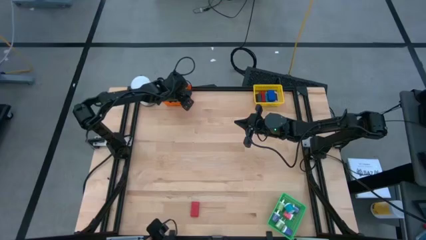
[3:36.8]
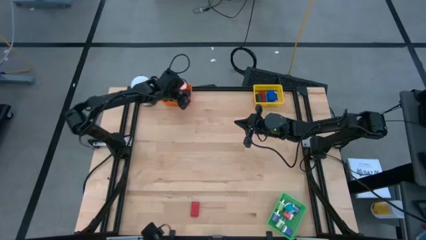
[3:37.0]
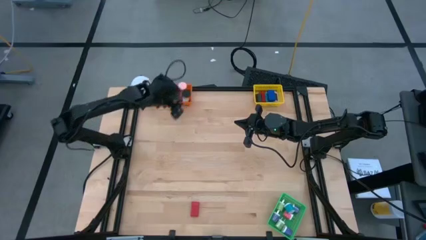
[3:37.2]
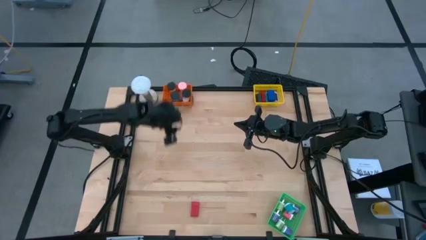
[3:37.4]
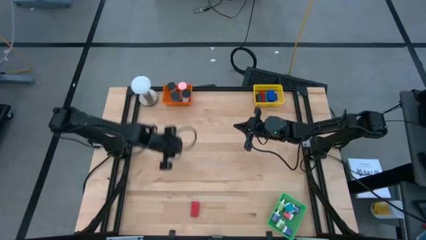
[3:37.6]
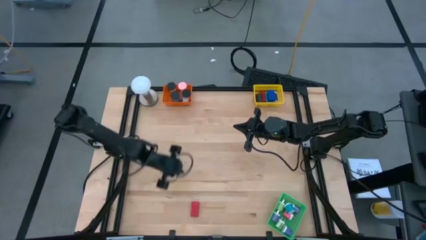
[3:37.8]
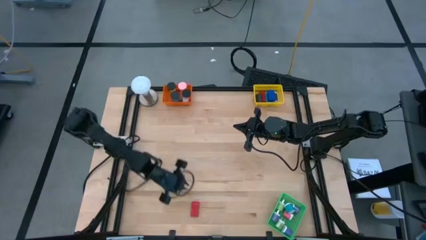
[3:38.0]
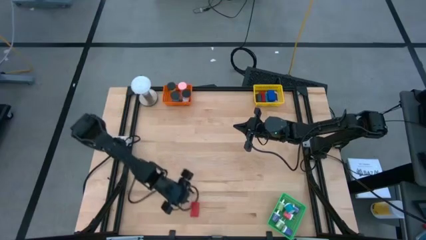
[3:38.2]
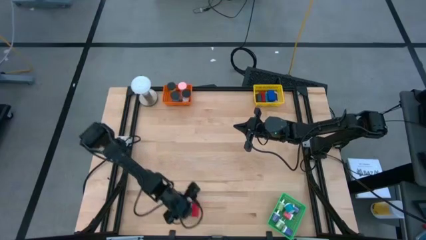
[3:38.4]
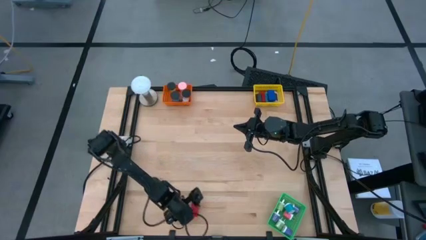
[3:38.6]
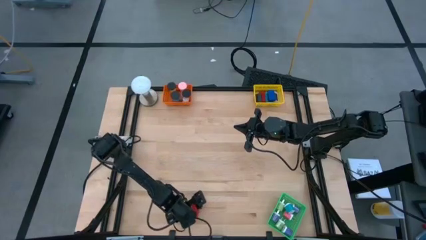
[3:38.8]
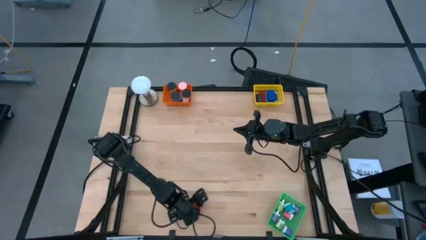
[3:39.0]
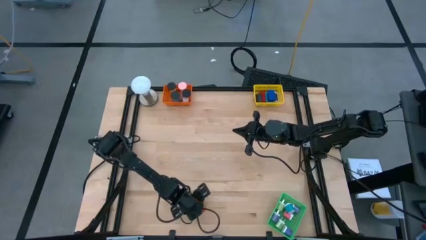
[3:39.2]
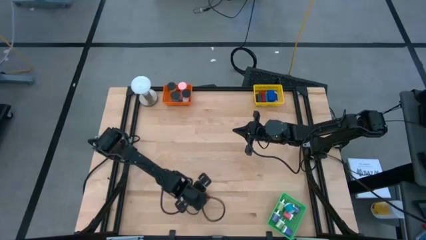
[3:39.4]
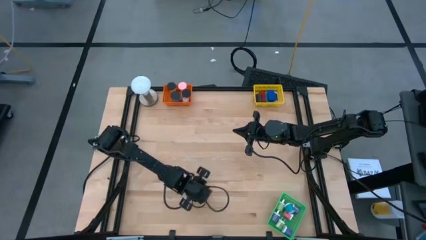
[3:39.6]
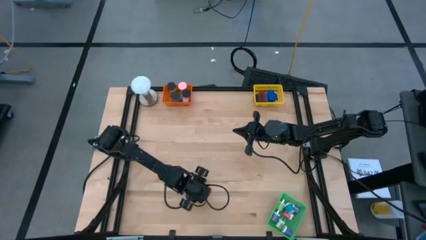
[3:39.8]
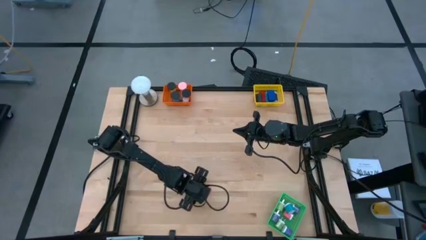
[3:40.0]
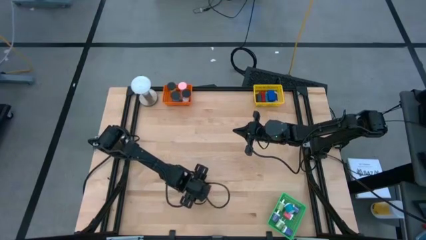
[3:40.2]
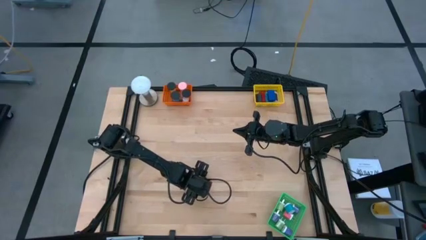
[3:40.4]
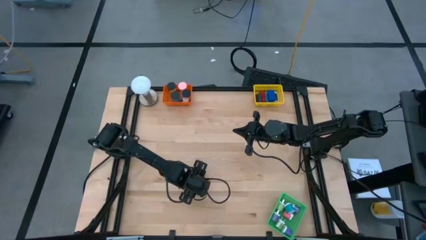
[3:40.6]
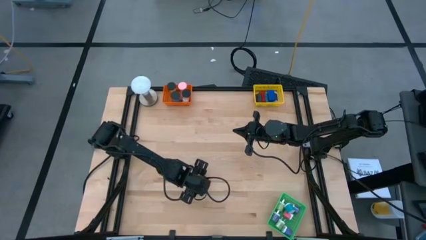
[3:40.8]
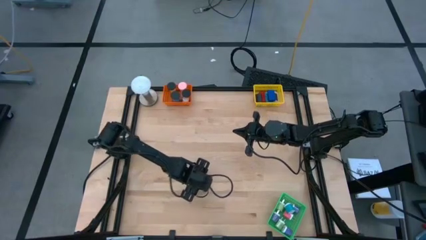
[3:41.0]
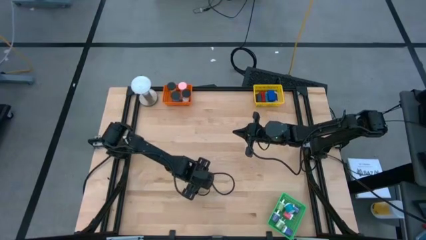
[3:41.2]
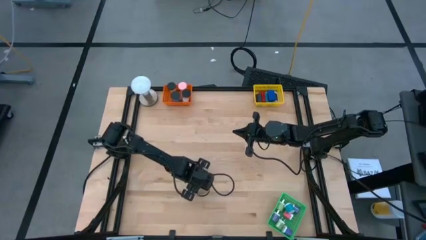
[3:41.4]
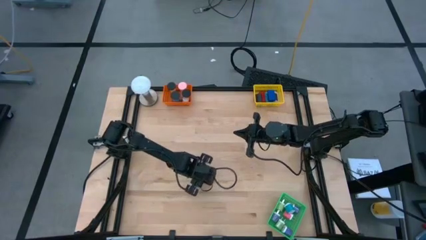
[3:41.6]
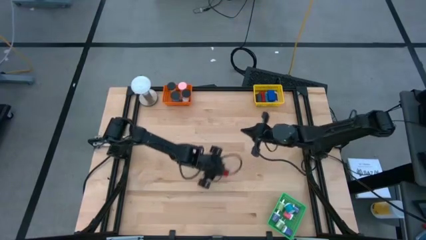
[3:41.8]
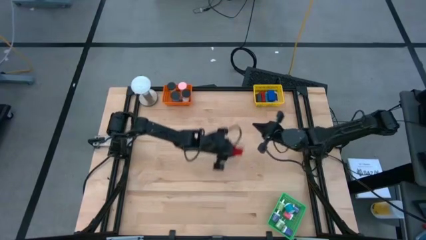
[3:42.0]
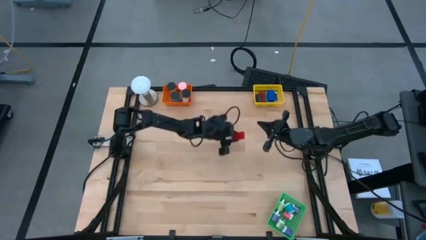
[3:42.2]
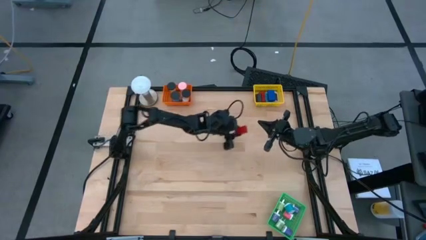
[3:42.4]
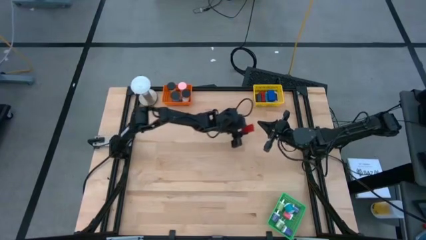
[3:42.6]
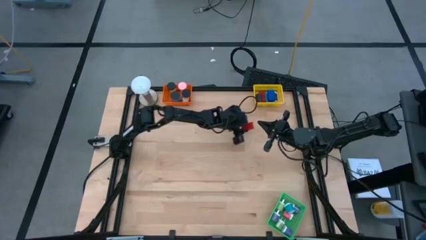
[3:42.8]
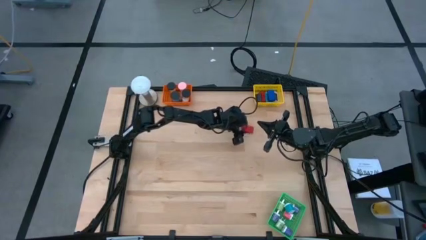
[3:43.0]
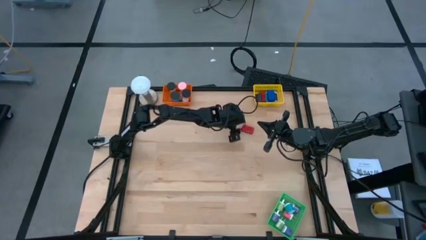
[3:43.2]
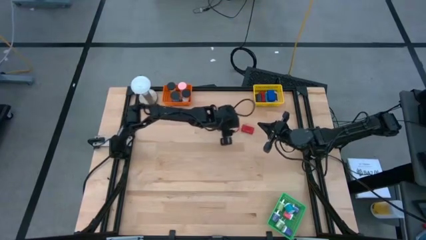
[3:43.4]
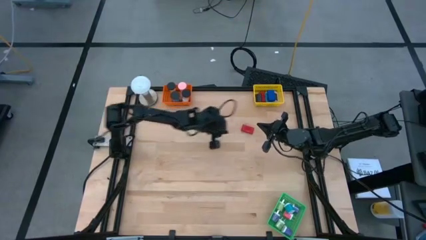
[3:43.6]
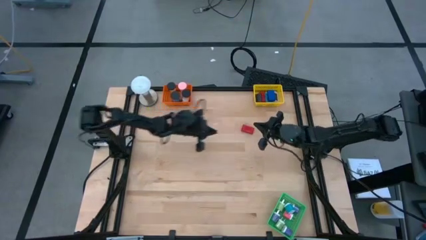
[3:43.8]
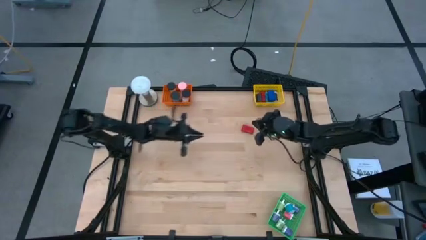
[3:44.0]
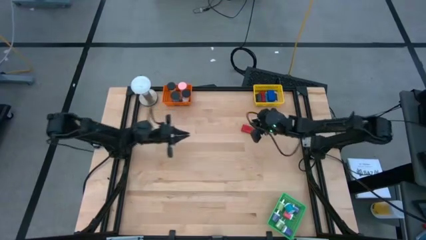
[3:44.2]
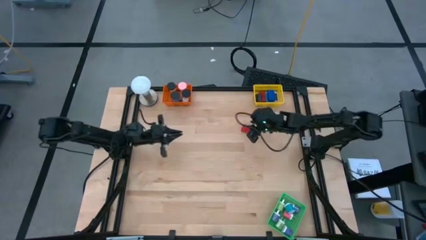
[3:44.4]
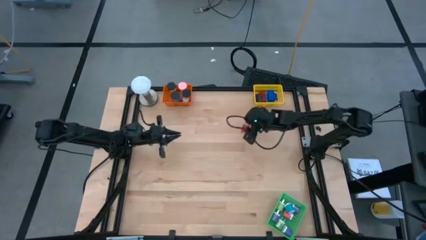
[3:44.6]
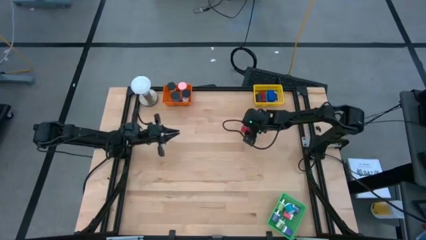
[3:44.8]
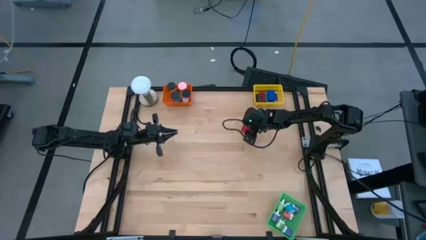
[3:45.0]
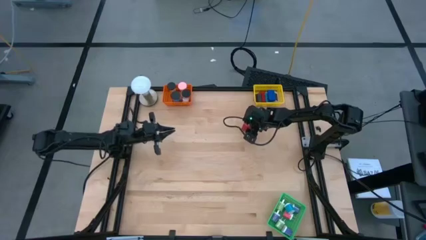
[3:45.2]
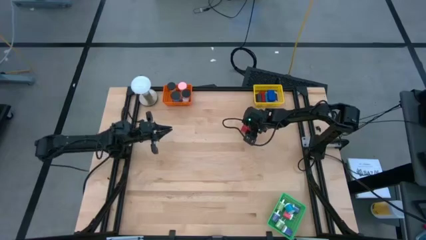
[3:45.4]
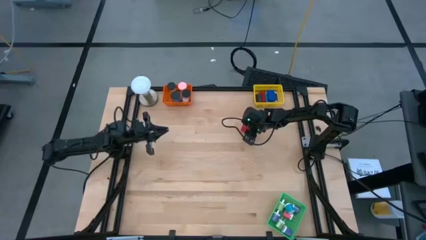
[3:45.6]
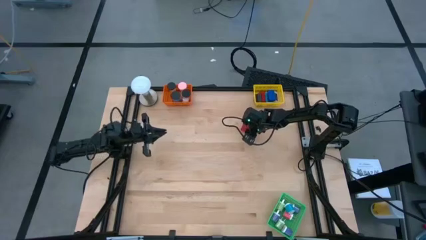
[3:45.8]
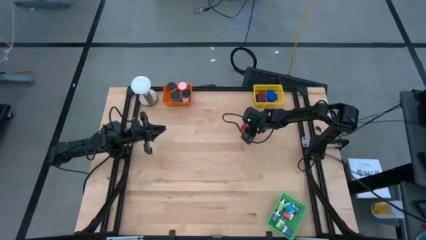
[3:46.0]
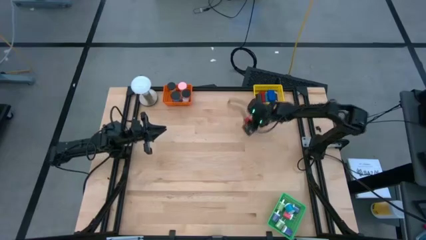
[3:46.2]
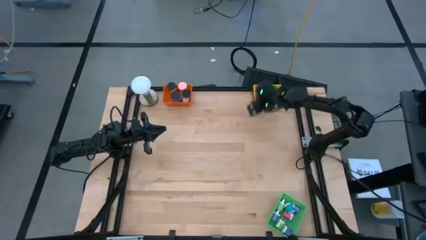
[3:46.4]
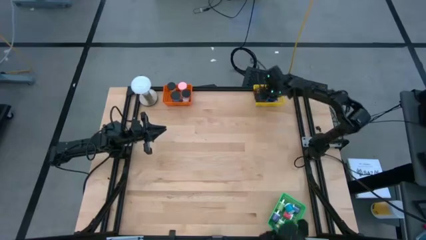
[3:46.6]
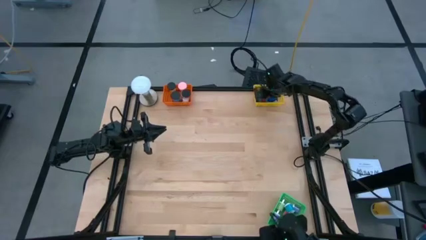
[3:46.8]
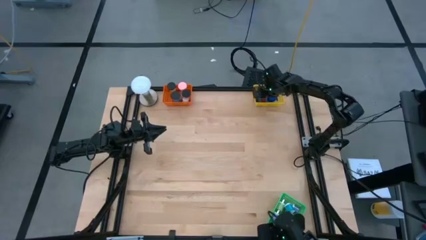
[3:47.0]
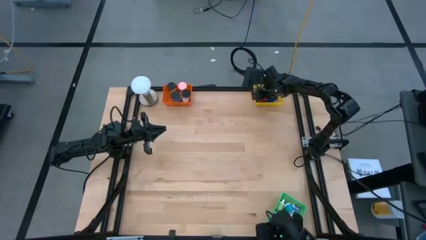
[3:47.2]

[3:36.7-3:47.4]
Task: Pick & Place Office items
Put the red timer into the yellow basket

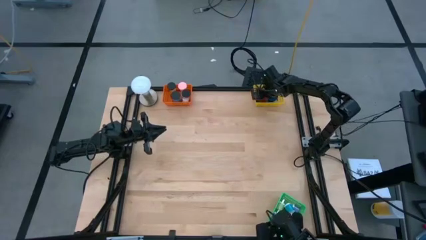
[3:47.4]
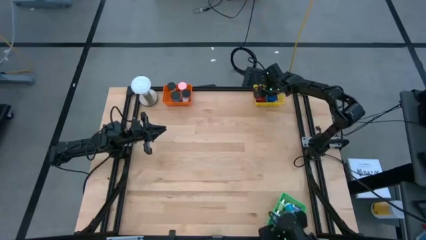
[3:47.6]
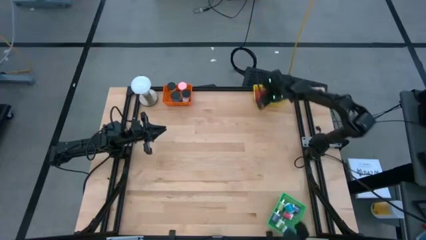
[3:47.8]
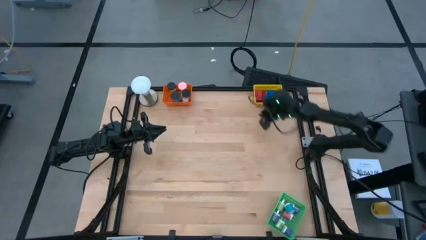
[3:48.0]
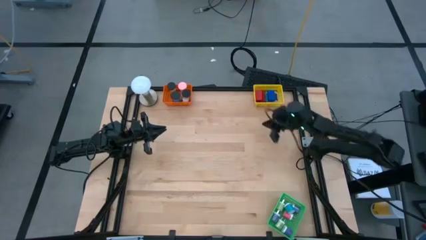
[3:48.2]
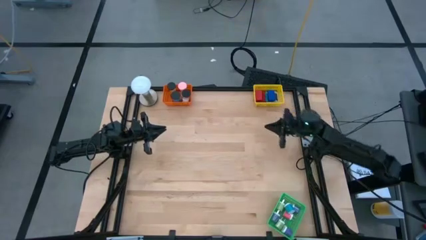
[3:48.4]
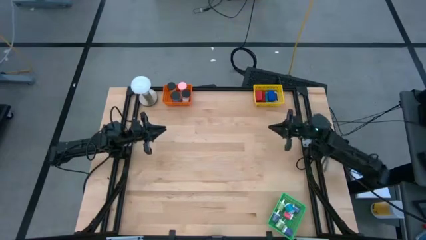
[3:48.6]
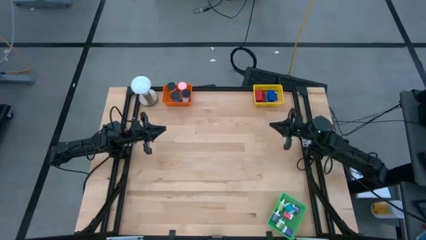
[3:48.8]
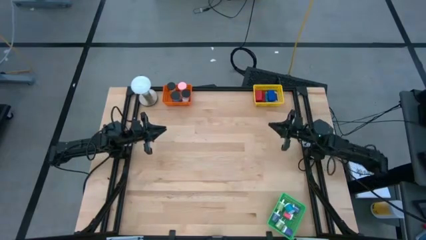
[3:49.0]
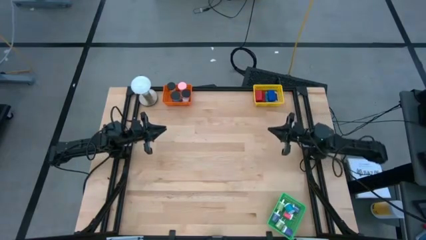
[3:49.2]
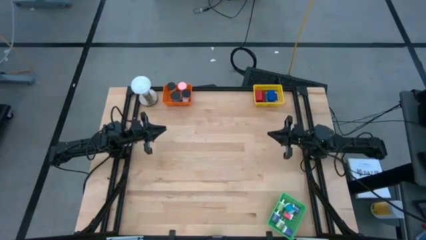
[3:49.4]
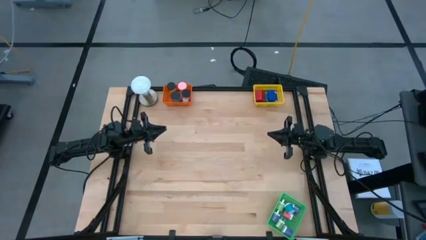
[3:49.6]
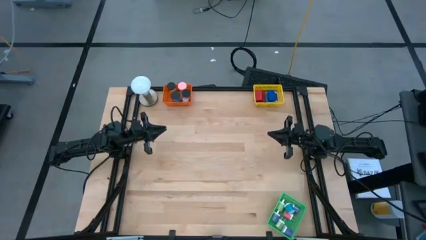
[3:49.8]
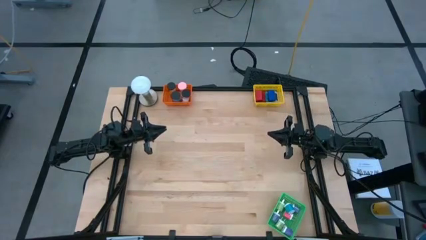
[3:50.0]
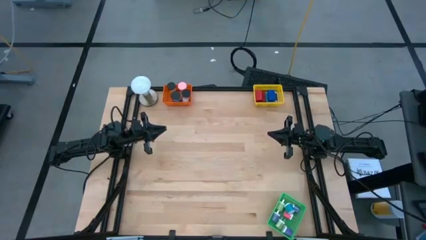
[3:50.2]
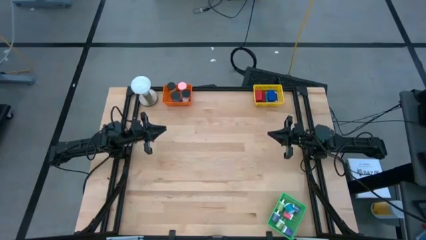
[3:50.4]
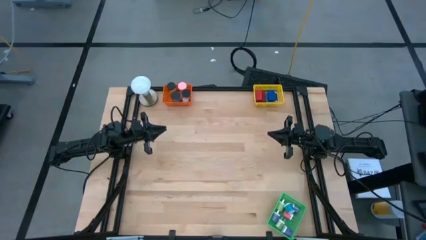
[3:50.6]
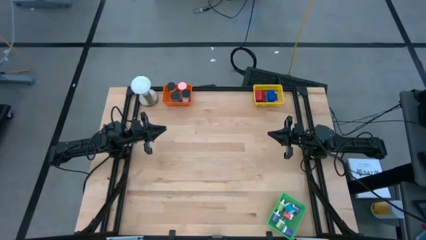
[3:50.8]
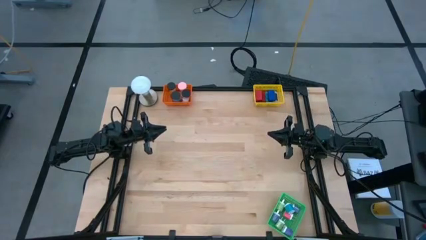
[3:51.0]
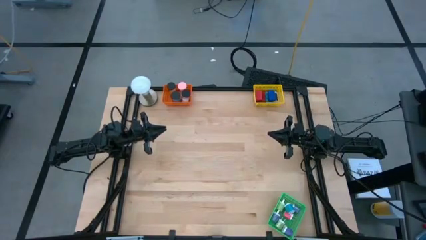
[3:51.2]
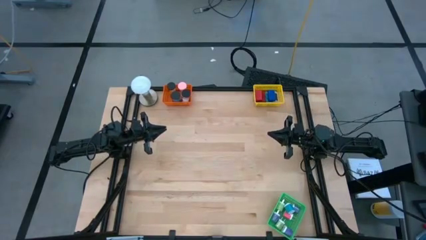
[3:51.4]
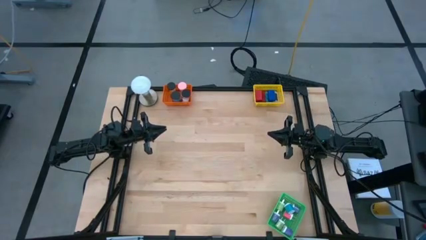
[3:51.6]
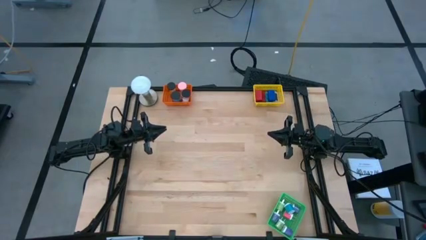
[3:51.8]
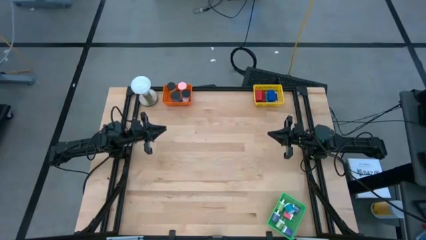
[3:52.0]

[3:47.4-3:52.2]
Return to Home Position

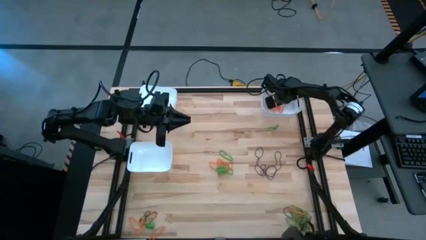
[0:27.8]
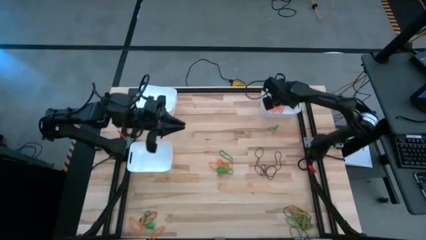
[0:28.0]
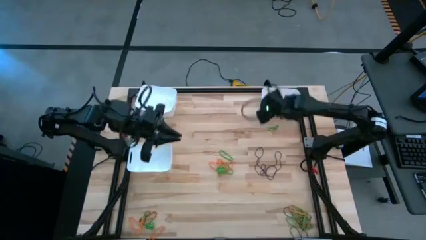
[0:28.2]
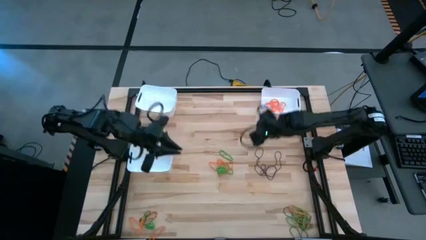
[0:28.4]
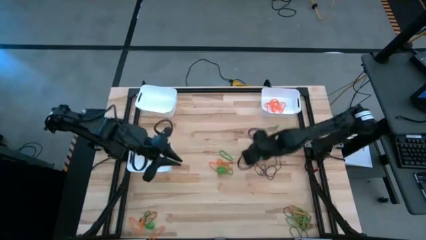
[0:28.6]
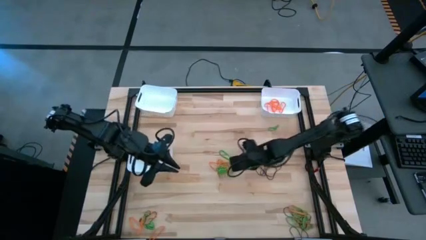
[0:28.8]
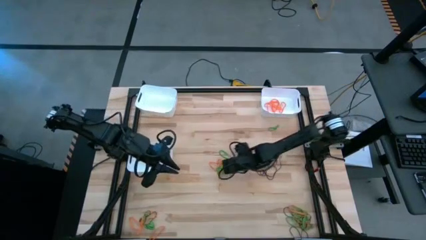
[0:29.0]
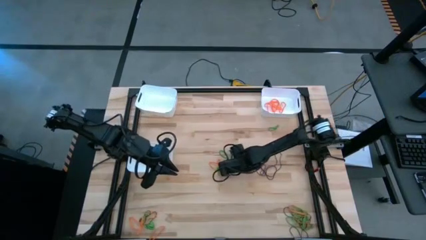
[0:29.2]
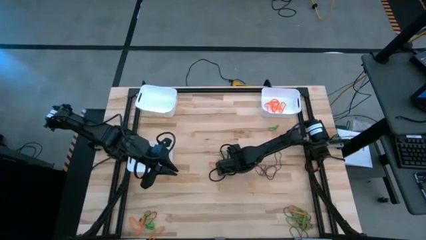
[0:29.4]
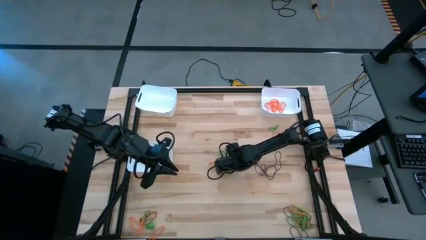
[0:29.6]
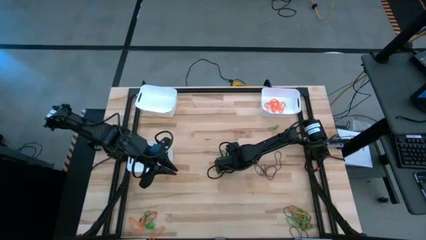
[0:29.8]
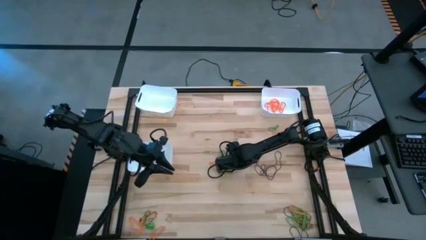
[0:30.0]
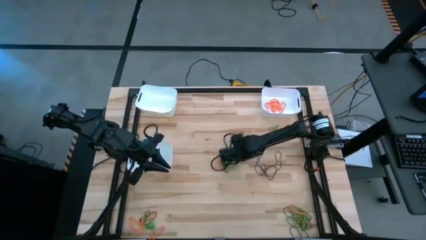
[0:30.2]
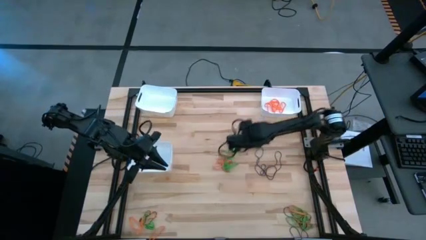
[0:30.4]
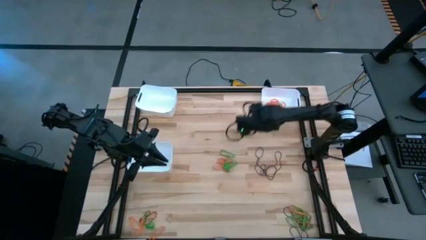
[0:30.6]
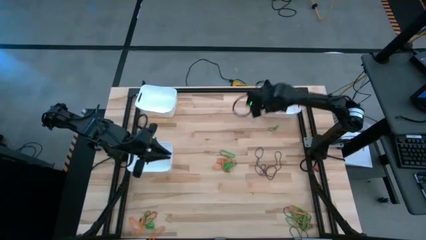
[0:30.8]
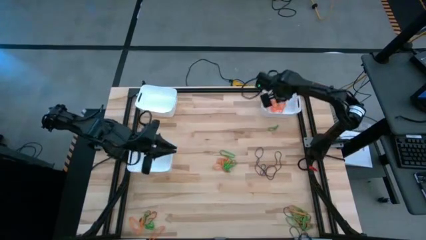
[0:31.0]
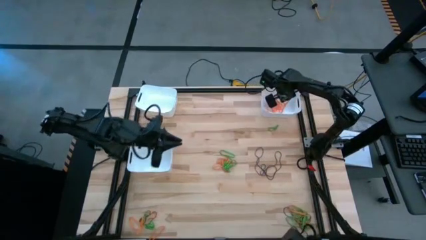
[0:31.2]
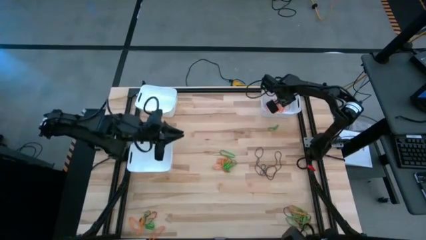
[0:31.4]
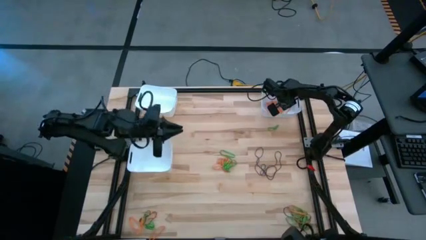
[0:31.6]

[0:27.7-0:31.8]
Task: Sort rubber bands into baskets
Put the orange rubber band into the top right white bin
